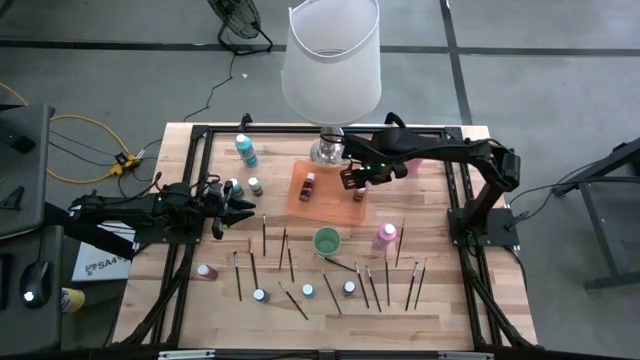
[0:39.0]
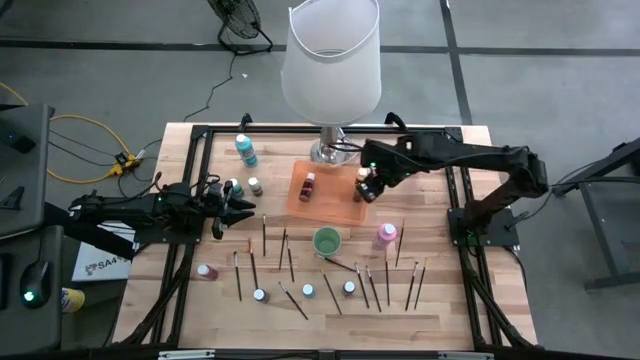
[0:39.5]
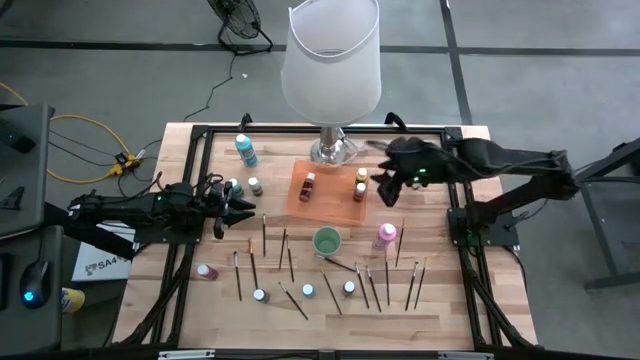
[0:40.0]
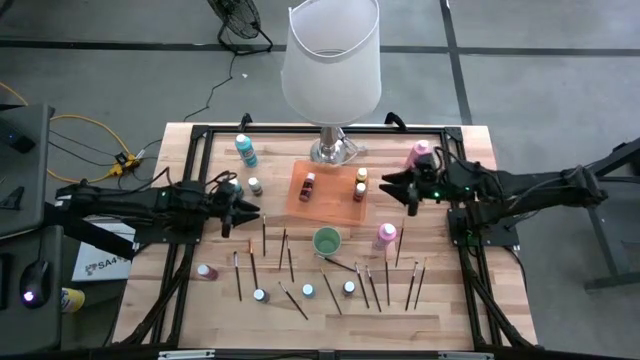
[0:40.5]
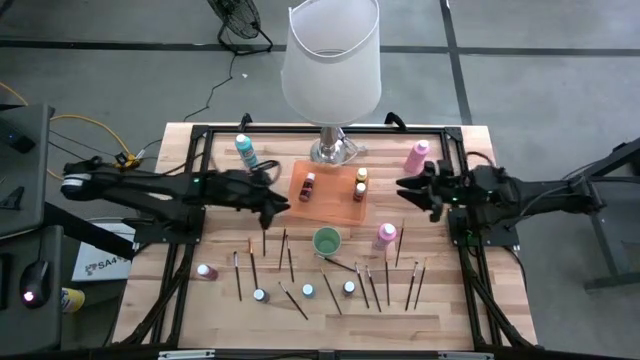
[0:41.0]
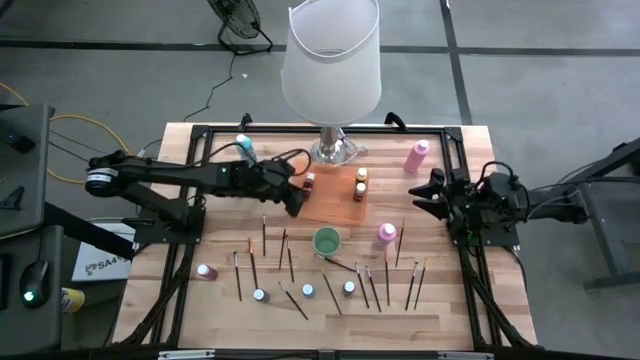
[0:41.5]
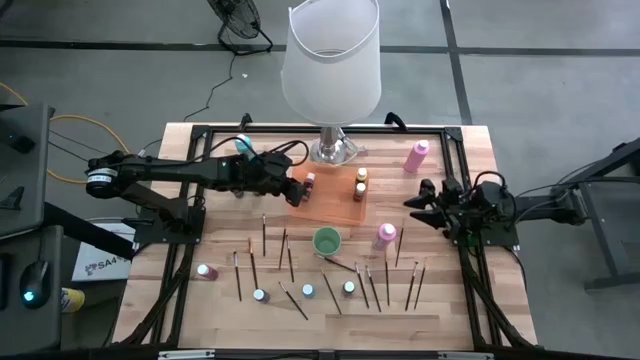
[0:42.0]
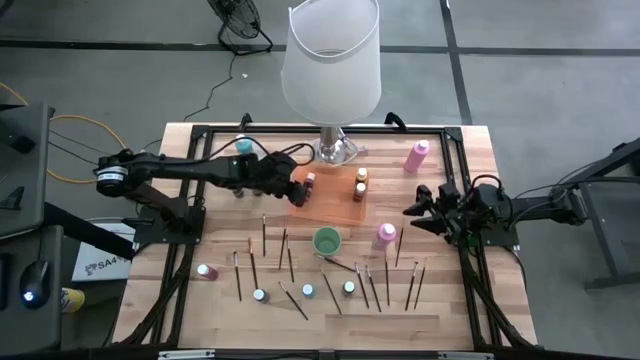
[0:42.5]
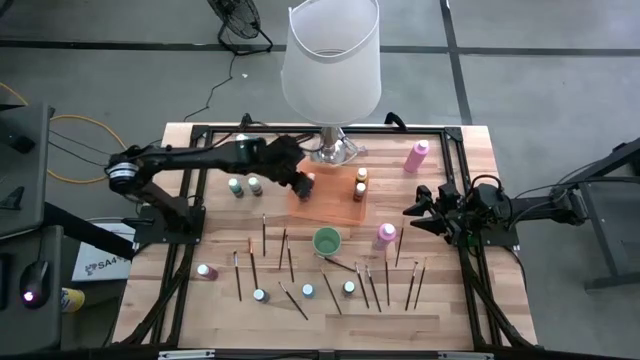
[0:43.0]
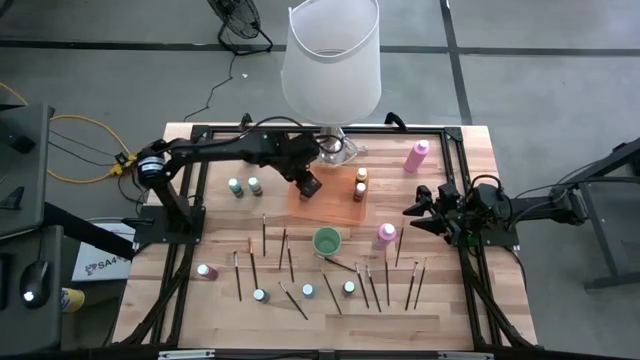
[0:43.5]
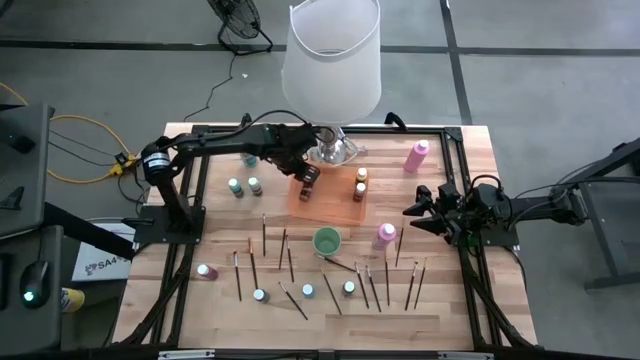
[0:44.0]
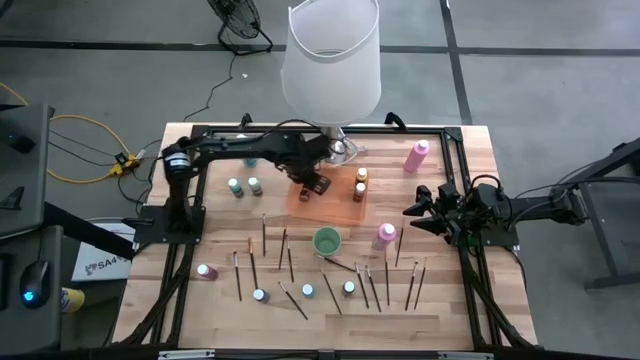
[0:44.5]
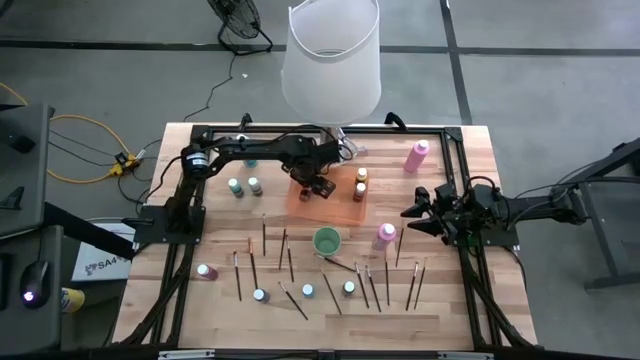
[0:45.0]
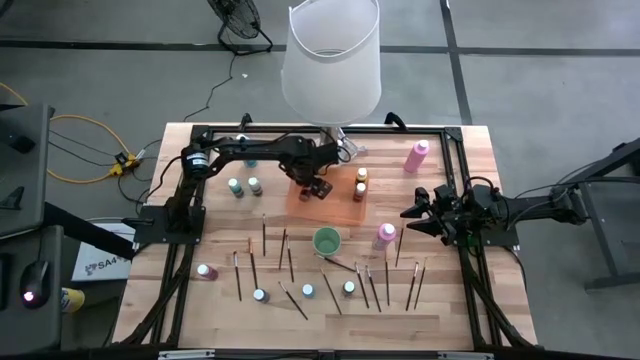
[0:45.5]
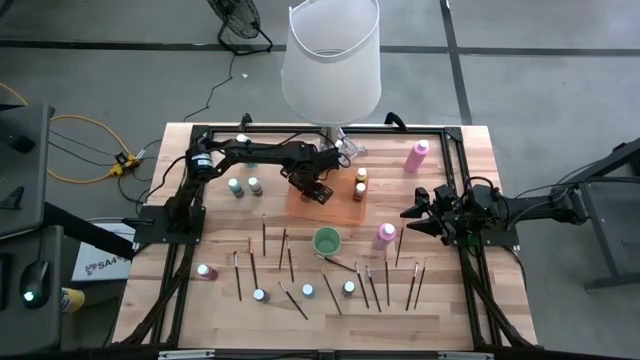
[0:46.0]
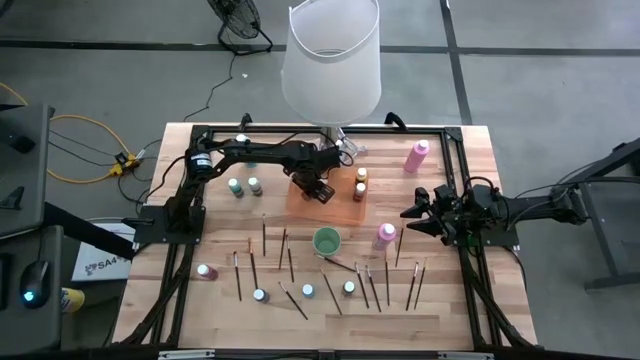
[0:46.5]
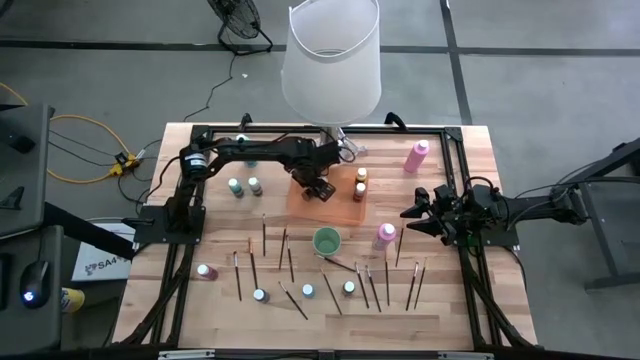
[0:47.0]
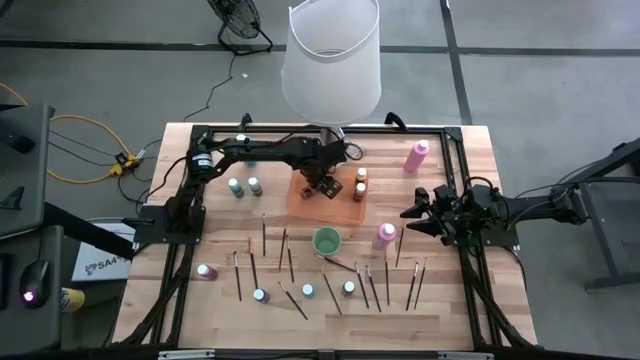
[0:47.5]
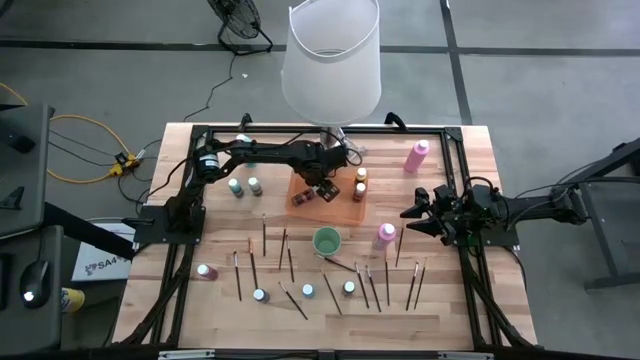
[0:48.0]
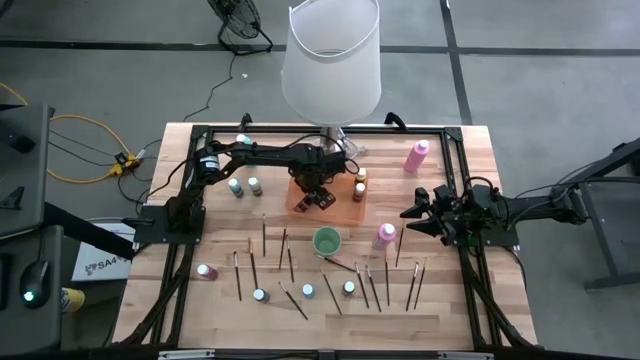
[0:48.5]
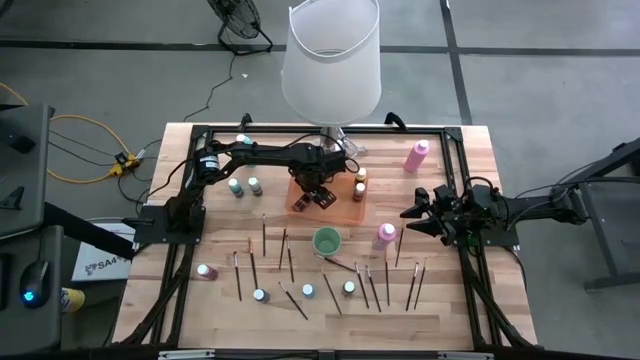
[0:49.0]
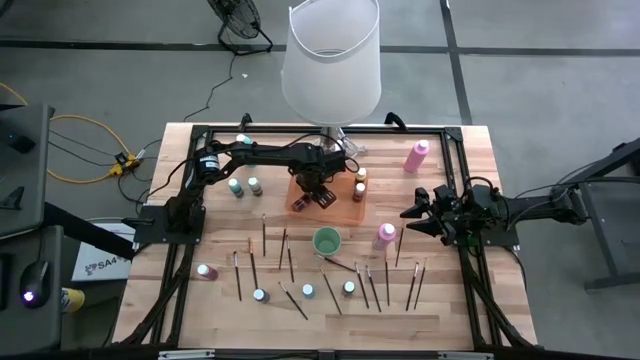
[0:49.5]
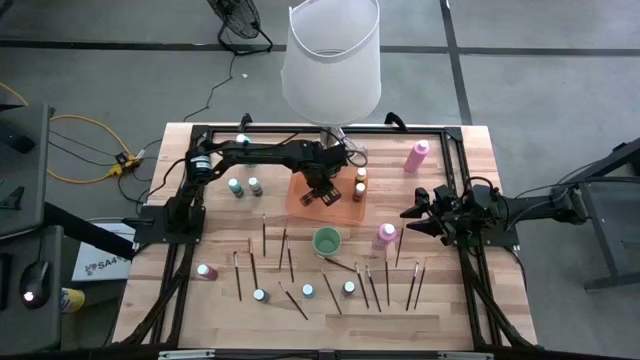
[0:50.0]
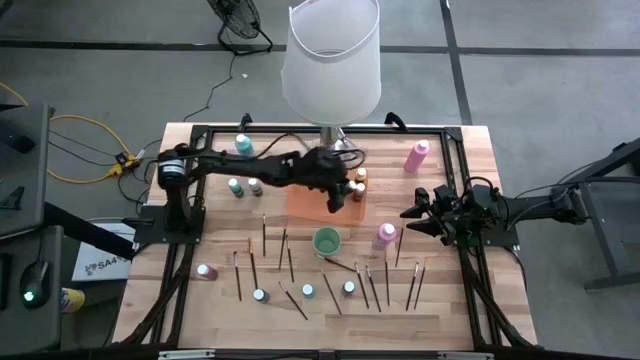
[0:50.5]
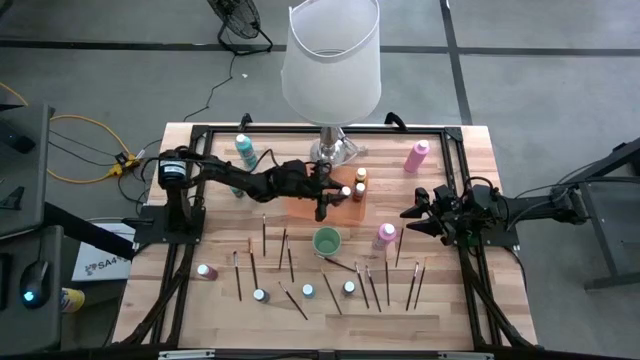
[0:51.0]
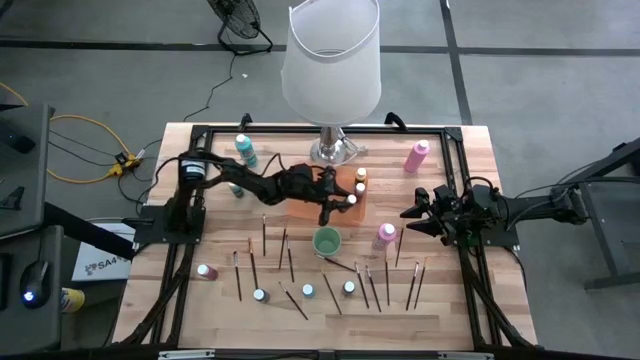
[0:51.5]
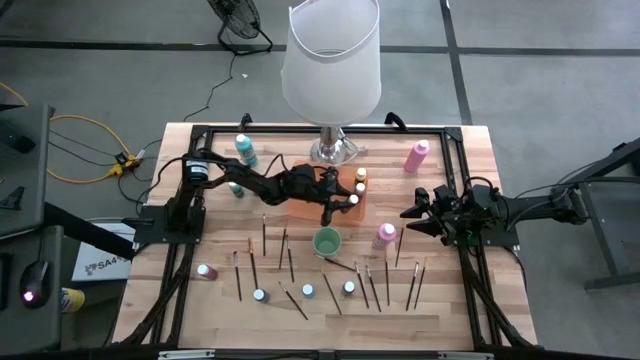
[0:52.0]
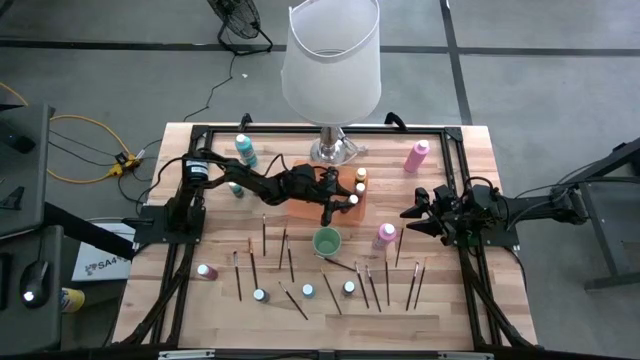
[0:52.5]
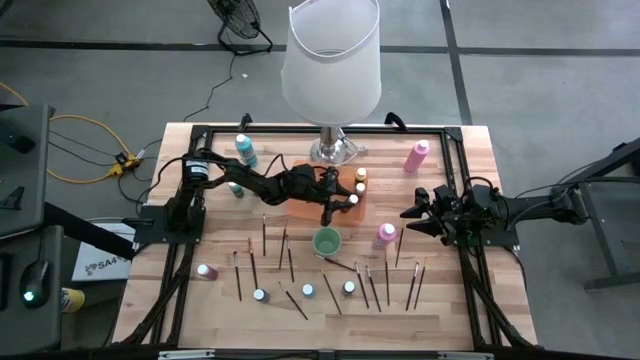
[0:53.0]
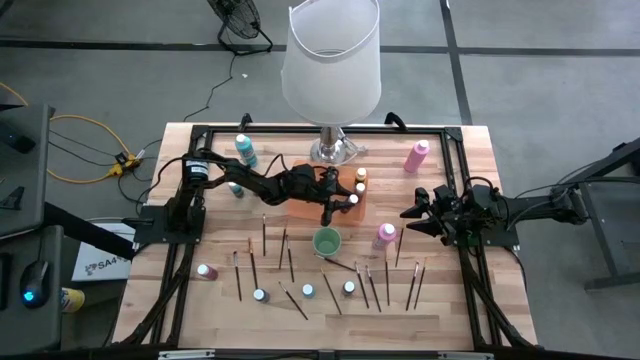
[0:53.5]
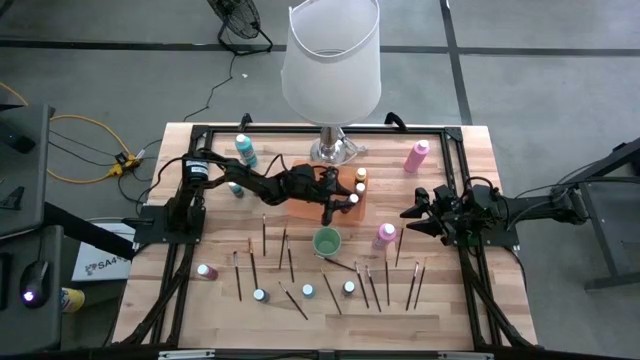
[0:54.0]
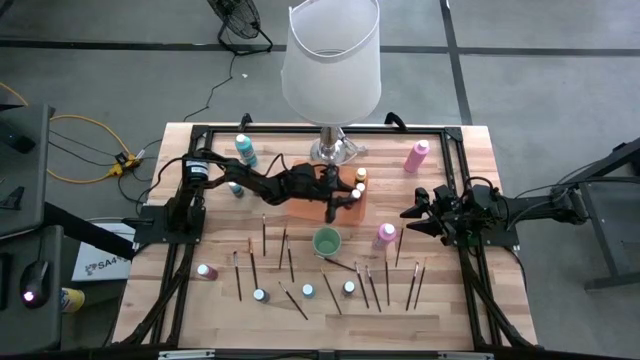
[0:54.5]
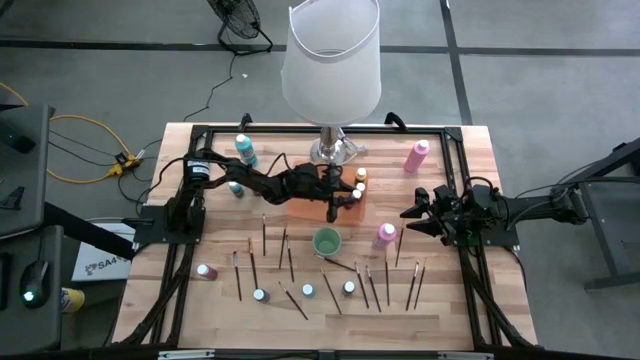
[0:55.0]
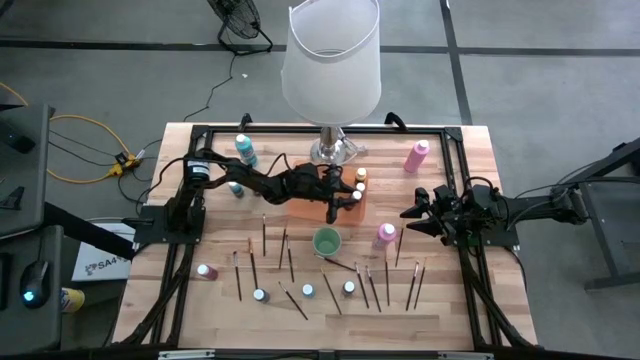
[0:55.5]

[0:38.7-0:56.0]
Task: Pick & Place Paint Supplies
Adjust the small brown paint bottle in the orange bin

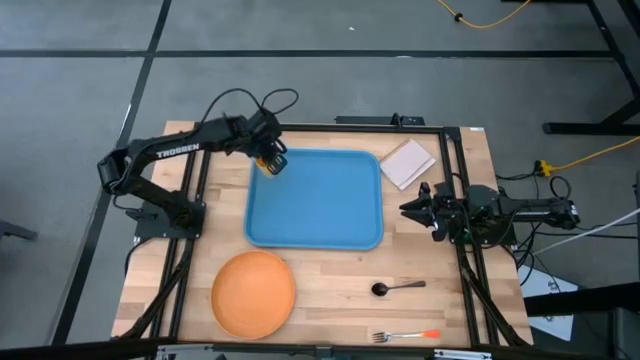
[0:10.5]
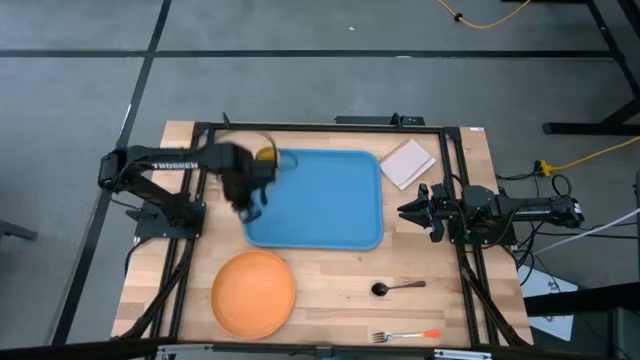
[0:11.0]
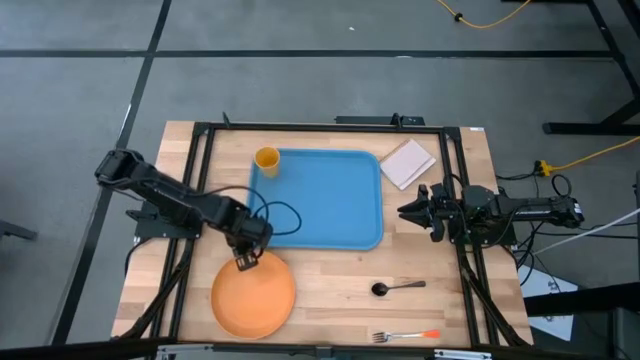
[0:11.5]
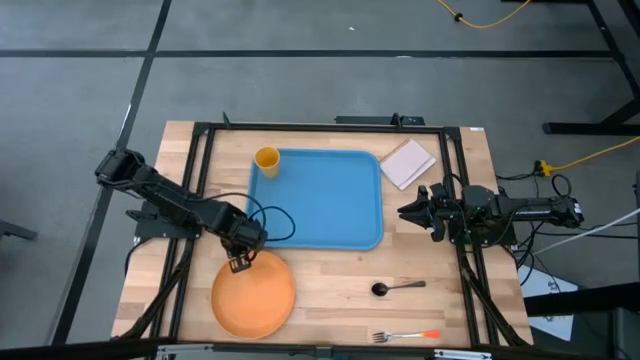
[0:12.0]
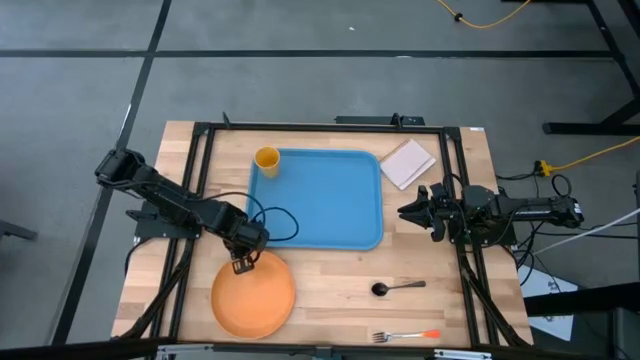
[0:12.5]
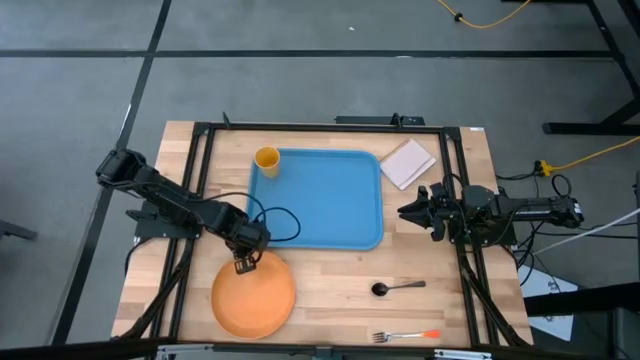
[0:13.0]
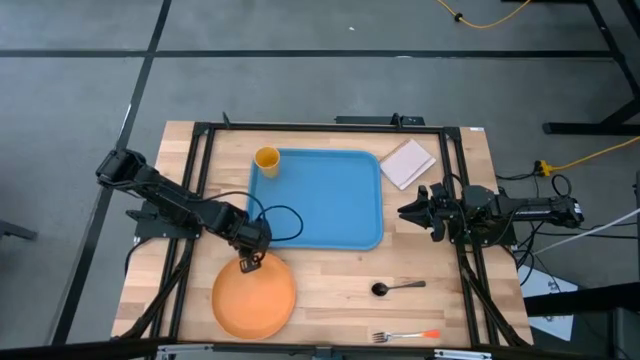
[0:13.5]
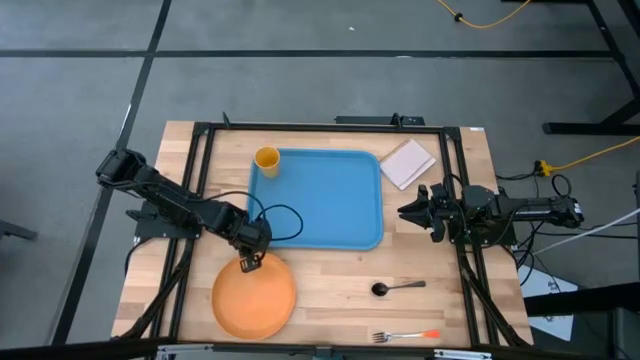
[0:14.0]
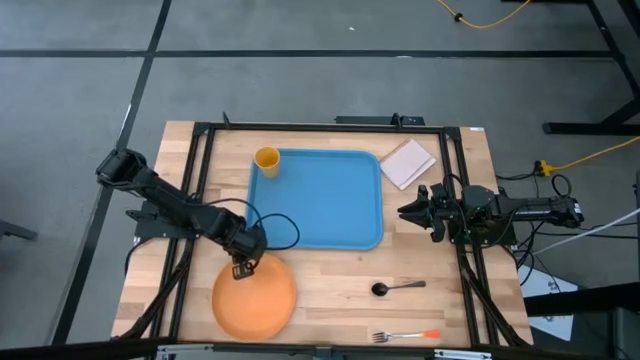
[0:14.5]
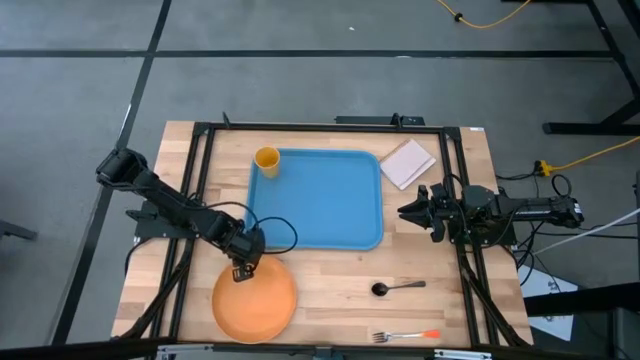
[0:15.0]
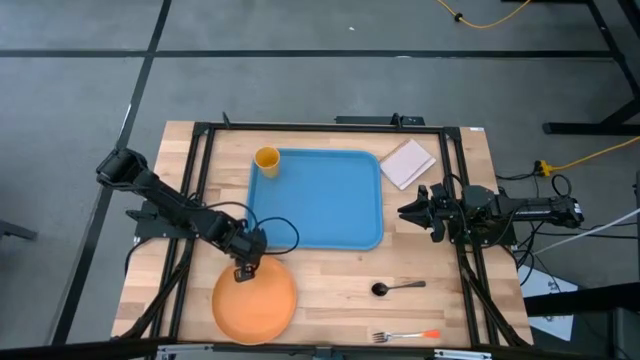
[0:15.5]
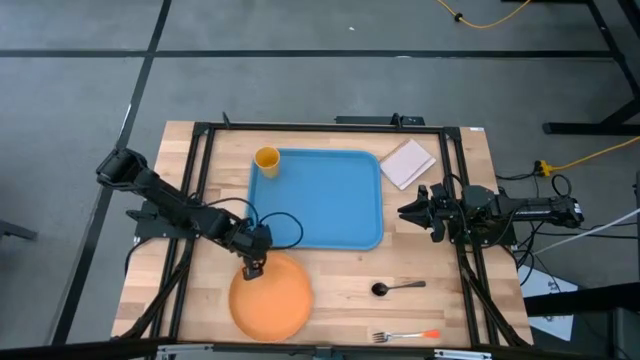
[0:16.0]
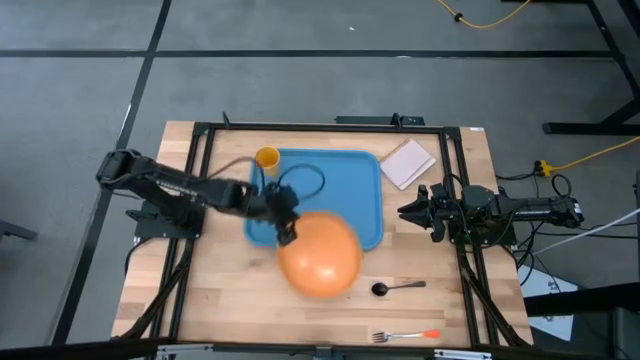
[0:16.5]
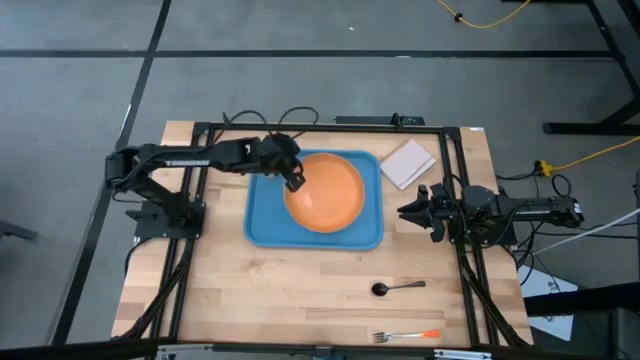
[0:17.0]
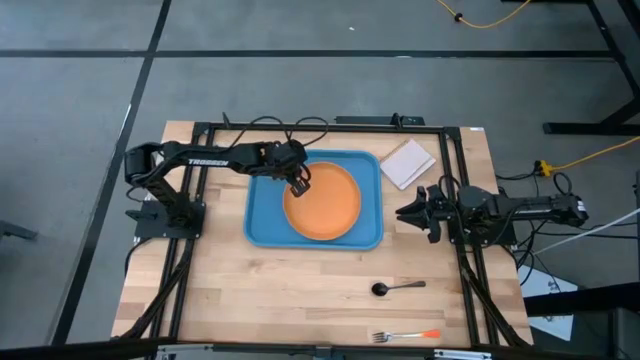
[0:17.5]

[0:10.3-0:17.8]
Task: Pick and place plate/cup/fork/spoon on tray
Put the orange plate to the bottom right of the orange cup on the blue tray
